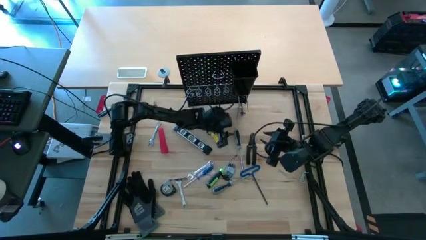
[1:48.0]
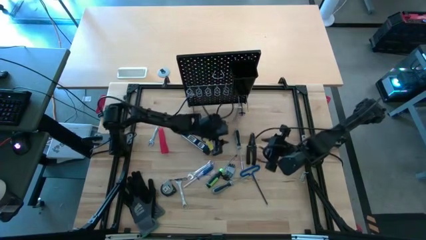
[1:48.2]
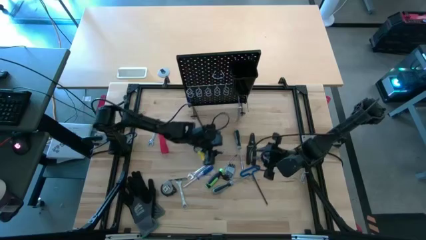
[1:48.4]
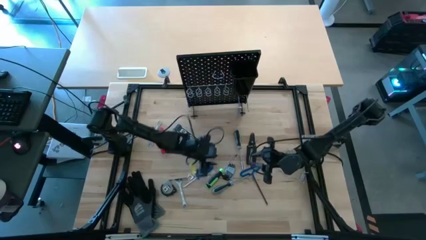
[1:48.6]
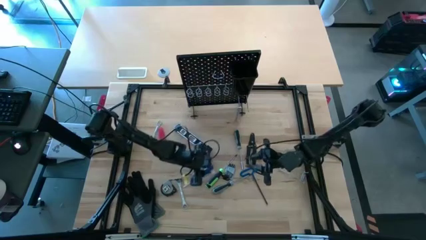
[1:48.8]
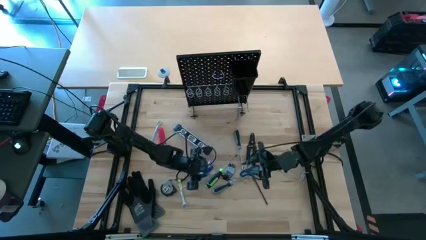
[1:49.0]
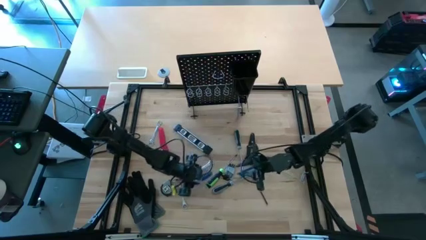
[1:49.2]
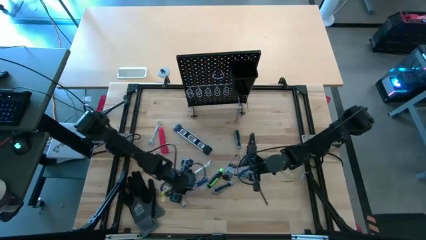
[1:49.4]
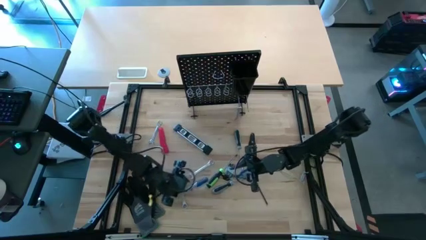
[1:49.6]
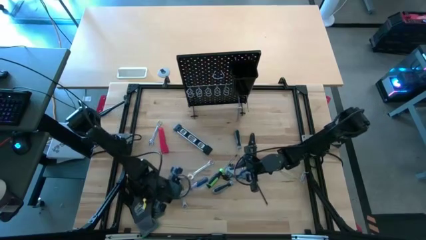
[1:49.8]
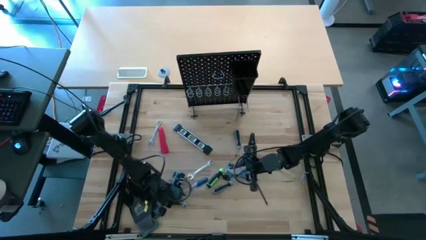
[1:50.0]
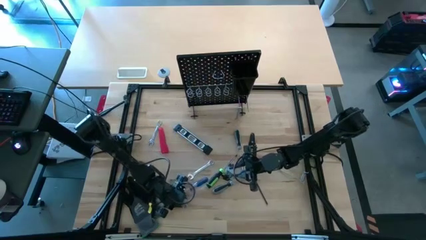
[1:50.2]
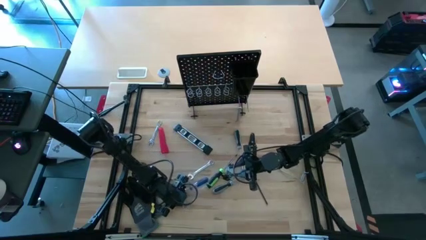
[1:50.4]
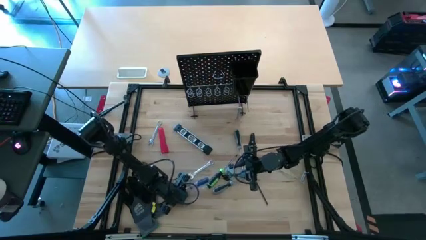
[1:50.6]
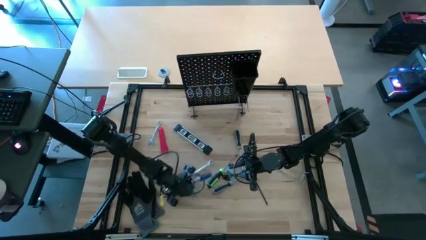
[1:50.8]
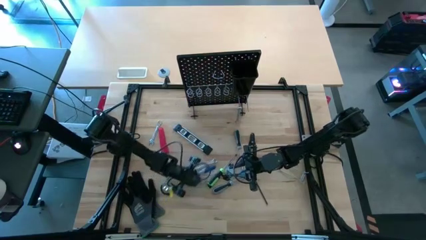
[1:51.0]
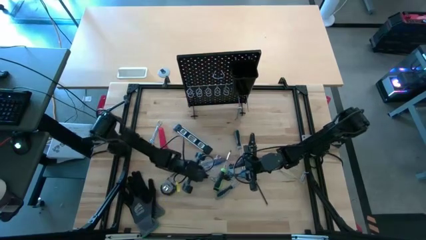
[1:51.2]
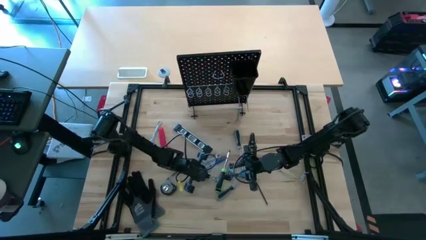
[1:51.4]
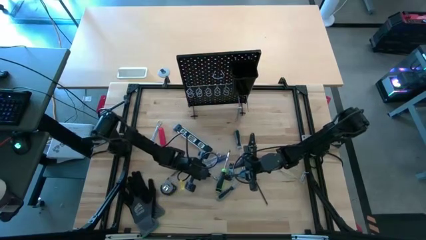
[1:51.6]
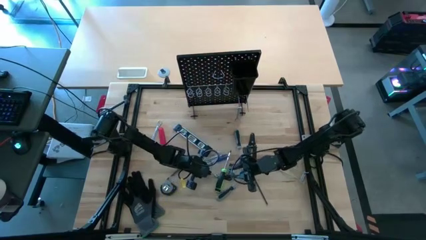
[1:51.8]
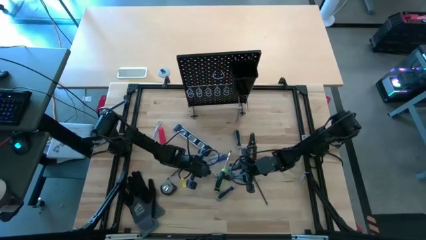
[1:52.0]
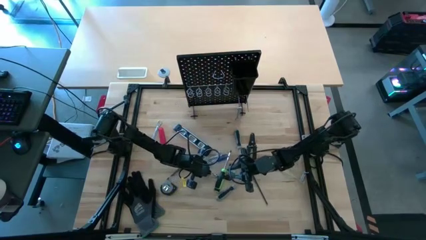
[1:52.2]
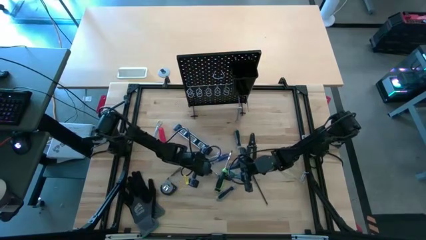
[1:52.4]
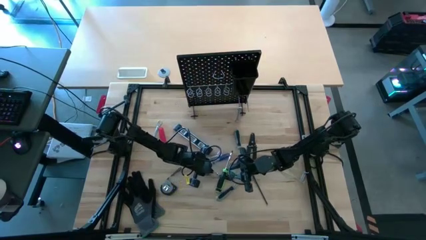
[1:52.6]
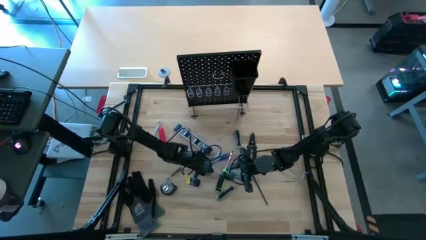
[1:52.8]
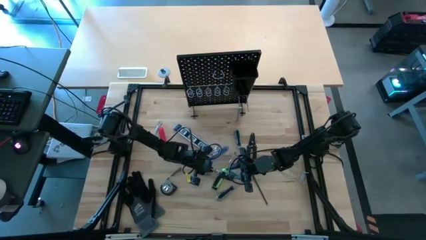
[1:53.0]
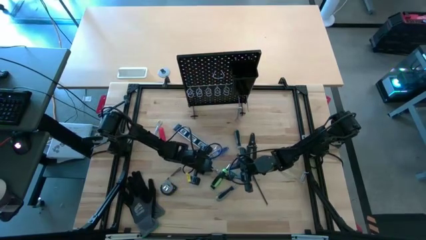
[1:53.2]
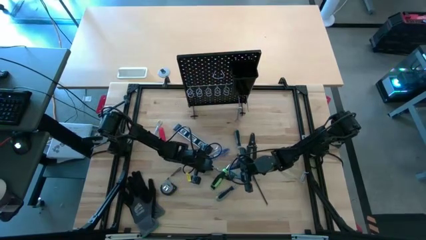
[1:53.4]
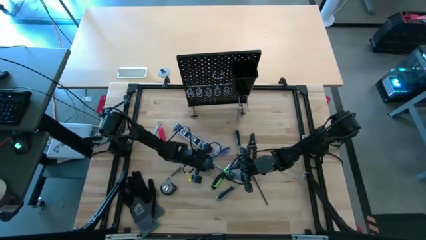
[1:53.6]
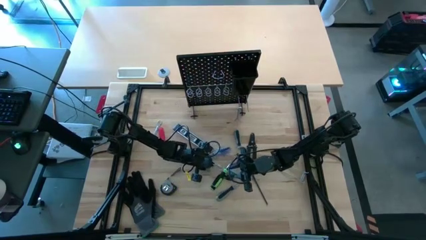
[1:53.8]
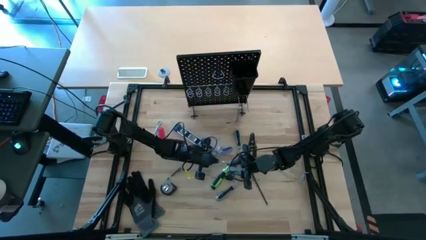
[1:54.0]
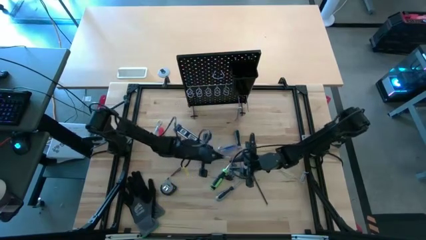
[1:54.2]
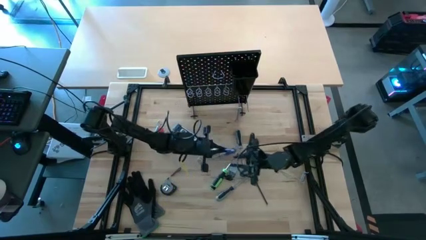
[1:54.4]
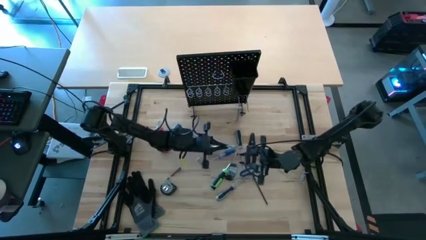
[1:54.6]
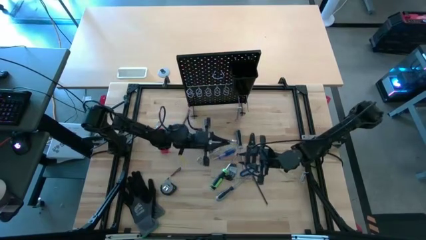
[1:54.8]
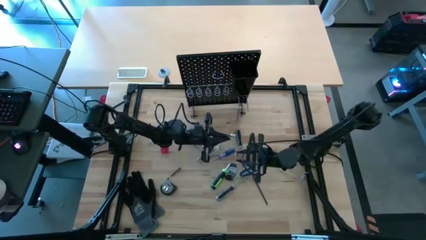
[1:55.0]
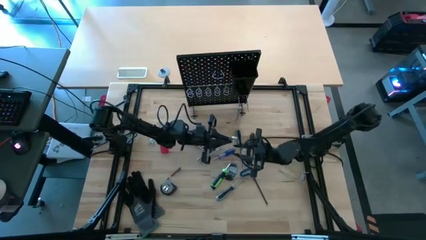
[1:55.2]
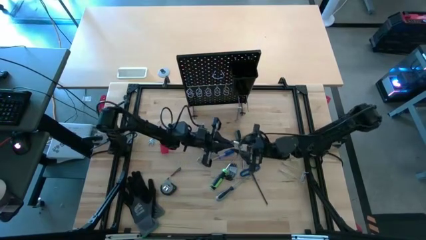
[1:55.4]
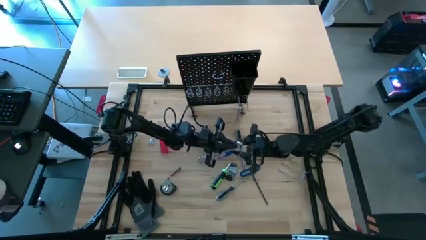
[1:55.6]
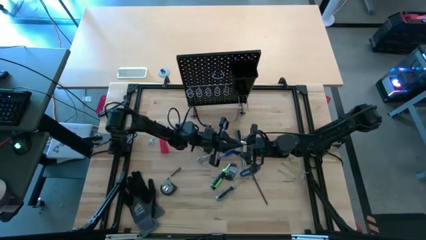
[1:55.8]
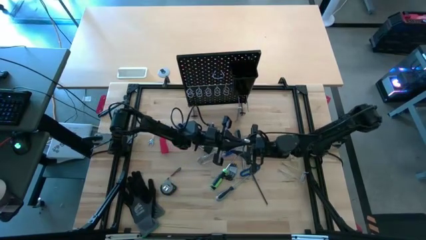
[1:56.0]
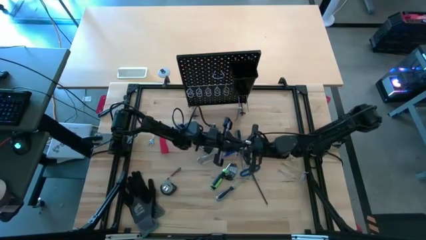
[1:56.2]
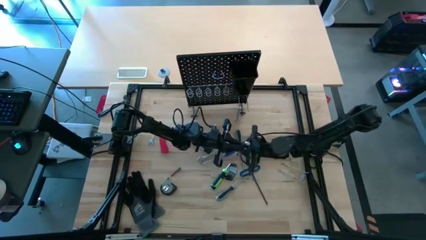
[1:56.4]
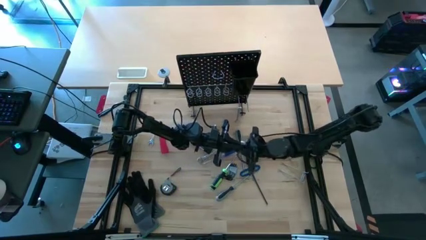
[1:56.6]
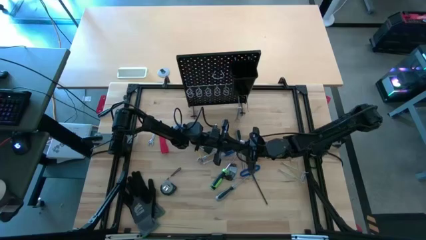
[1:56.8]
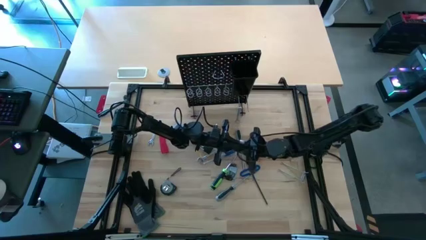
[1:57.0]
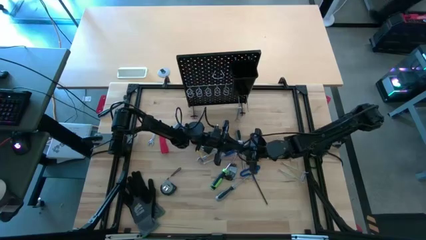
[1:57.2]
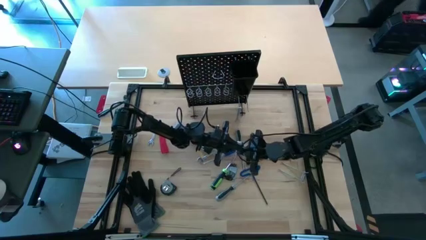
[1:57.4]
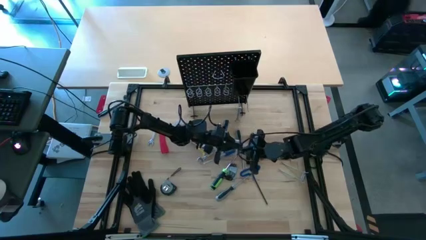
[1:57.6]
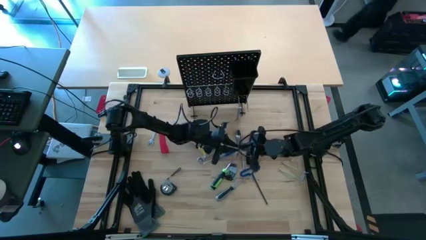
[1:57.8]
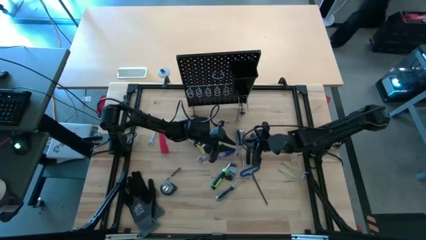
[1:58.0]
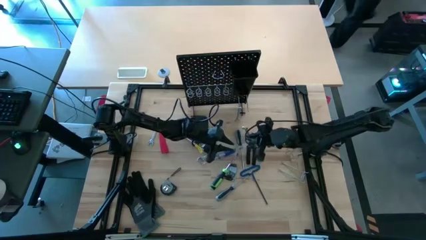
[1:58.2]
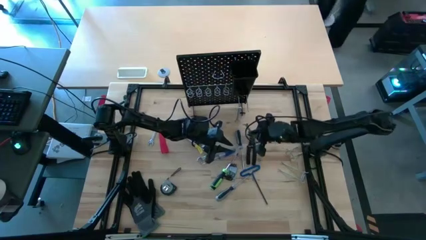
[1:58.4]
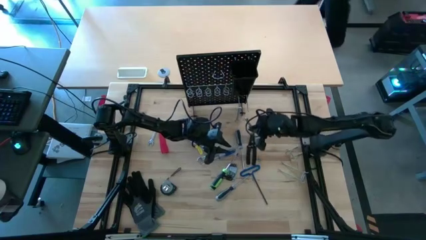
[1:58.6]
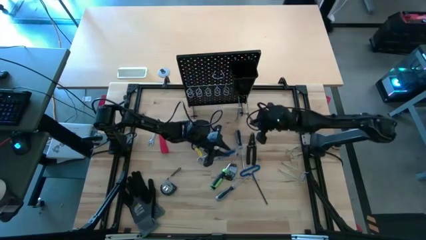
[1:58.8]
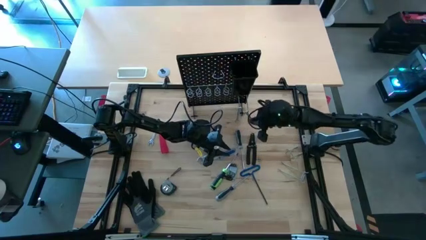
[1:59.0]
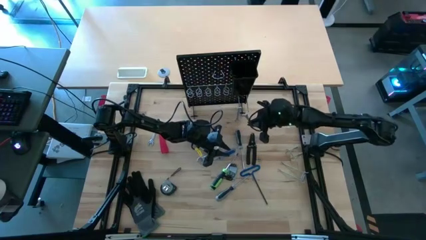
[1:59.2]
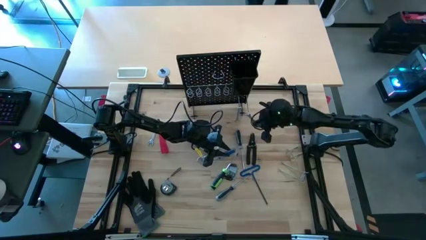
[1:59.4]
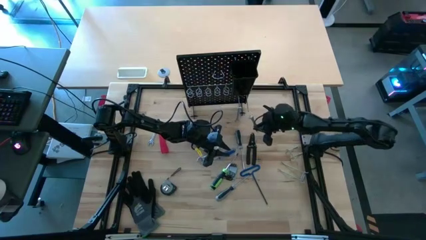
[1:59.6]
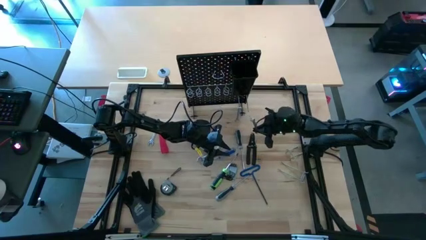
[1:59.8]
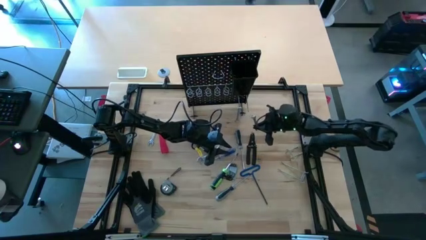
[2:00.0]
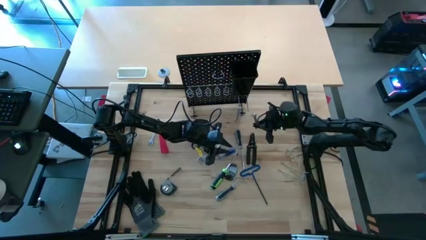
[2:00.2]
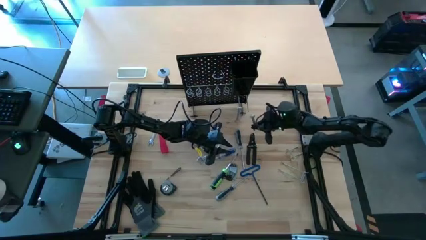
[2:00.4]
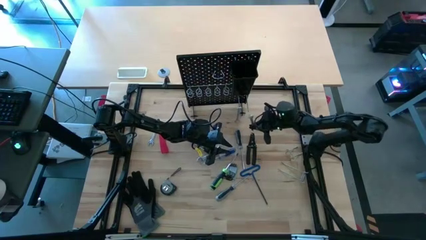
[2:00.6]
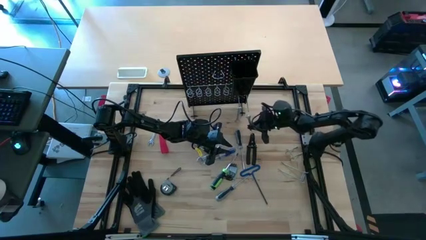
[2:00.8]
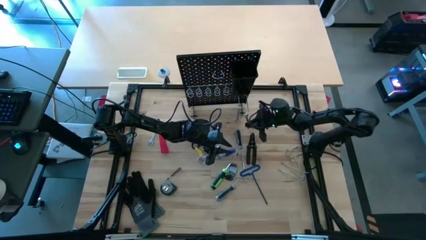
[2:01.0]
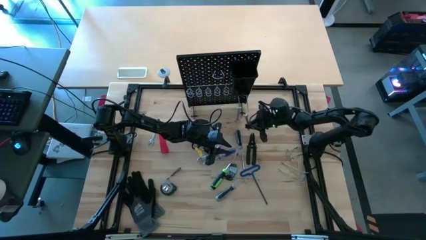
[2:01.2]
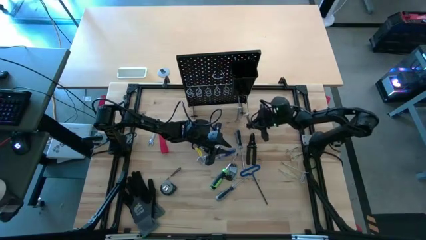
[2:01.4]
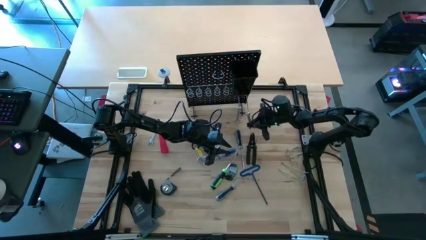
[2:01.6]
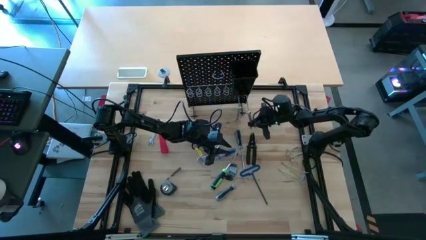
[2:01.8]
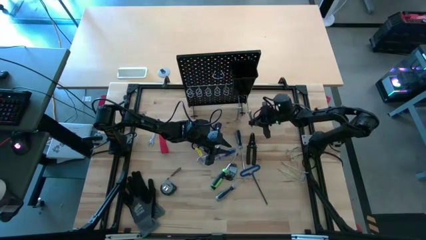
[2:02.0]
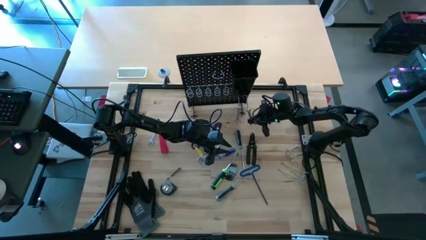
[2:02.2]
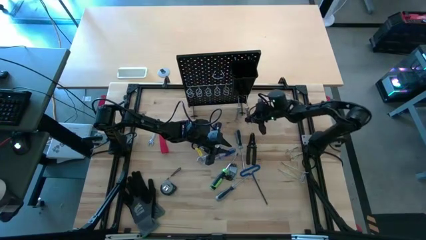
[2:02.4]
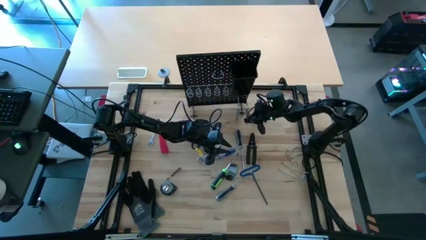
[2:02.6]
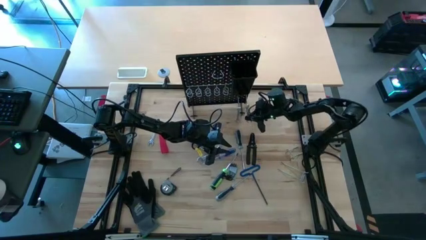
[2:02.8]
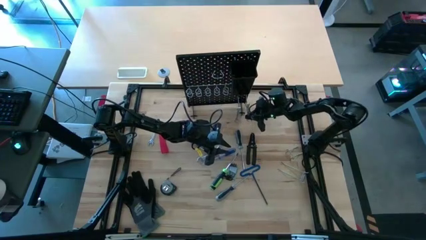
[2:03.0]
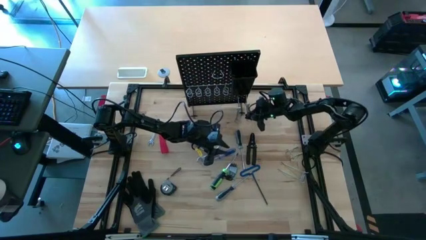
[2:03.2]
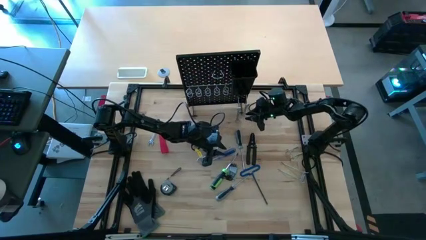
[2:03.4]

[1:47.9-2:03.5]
Task: Hang tools onto peg board
Hang the bottom wrench onto the pegboard
